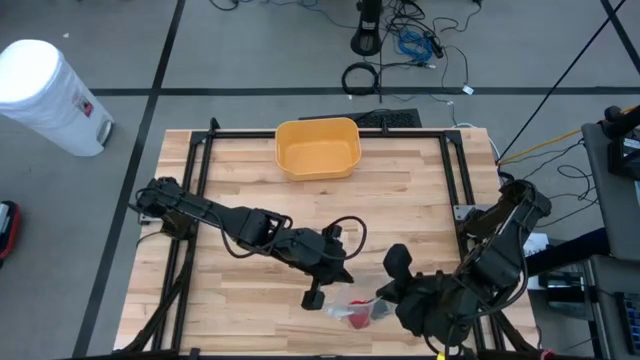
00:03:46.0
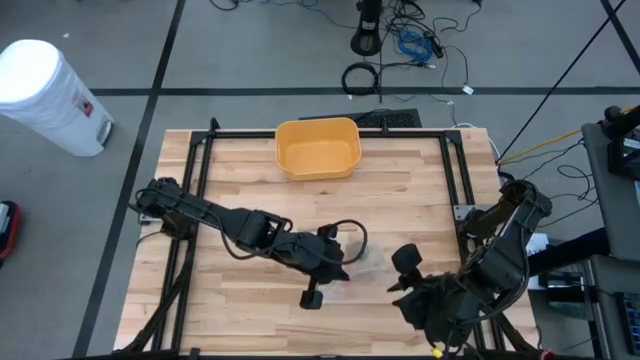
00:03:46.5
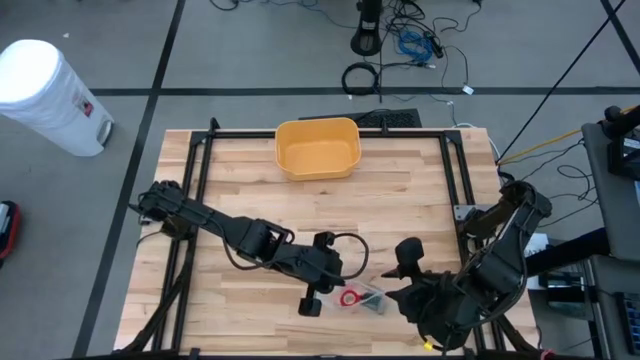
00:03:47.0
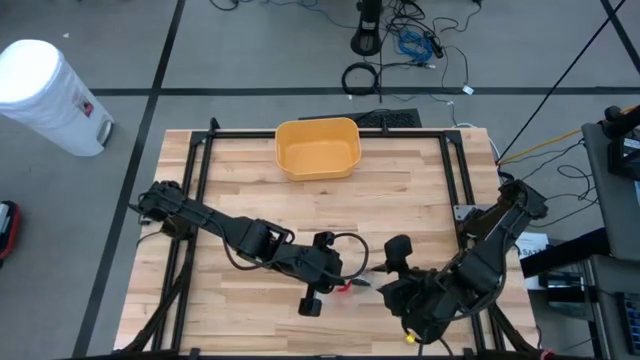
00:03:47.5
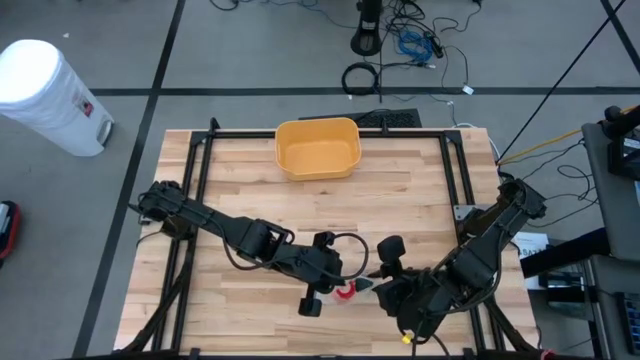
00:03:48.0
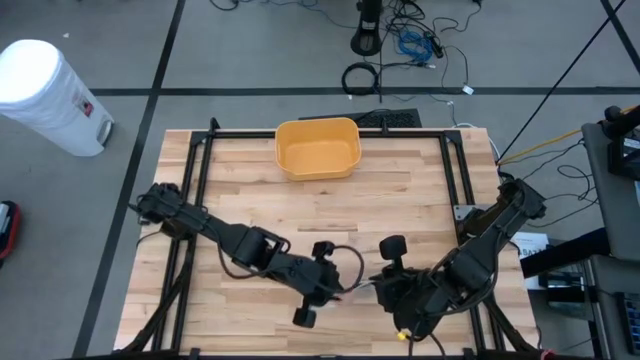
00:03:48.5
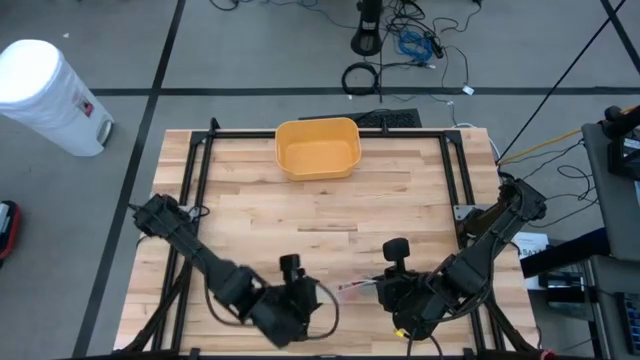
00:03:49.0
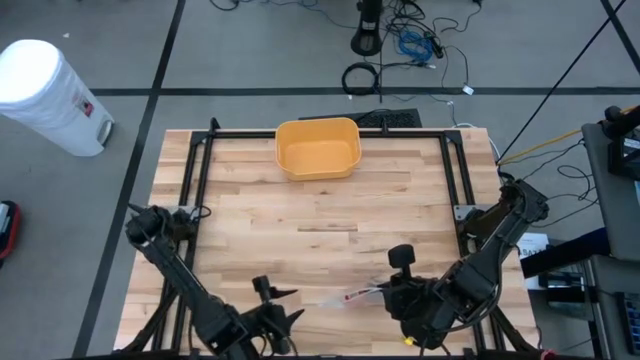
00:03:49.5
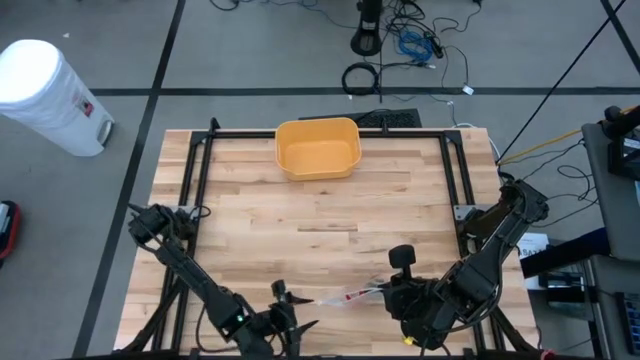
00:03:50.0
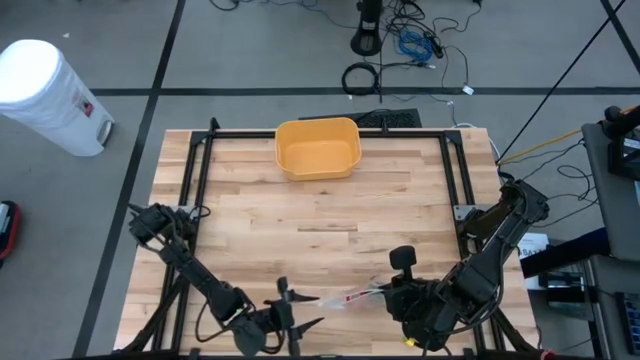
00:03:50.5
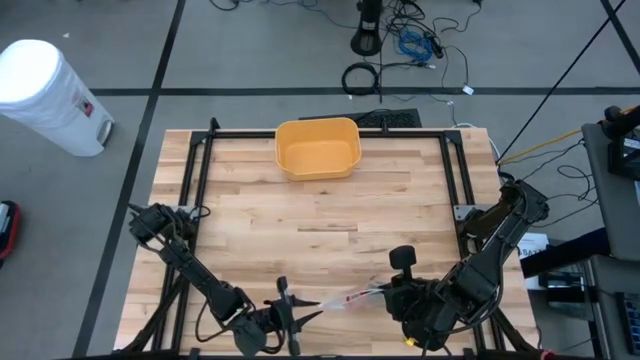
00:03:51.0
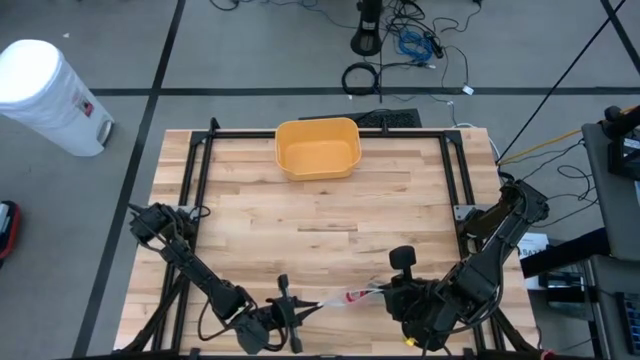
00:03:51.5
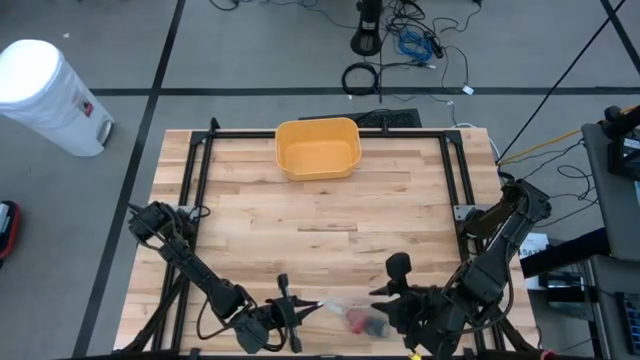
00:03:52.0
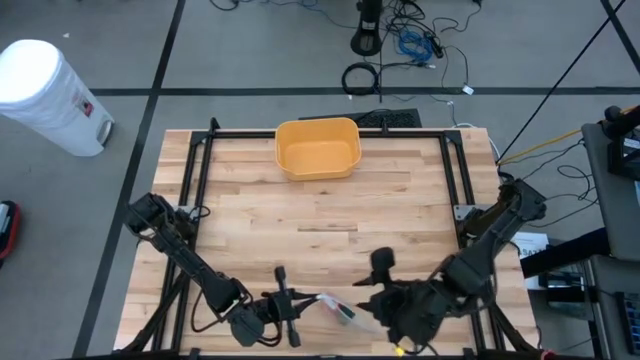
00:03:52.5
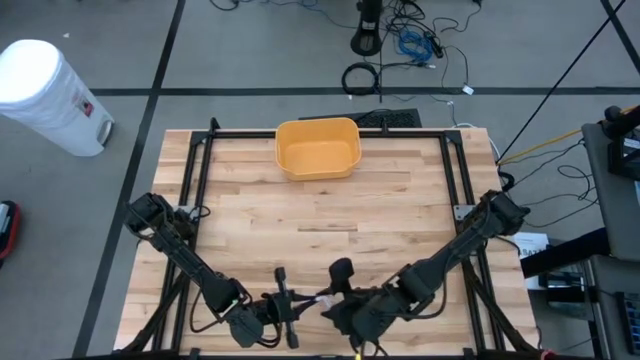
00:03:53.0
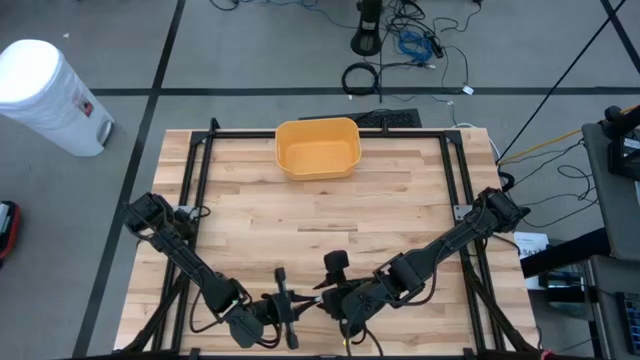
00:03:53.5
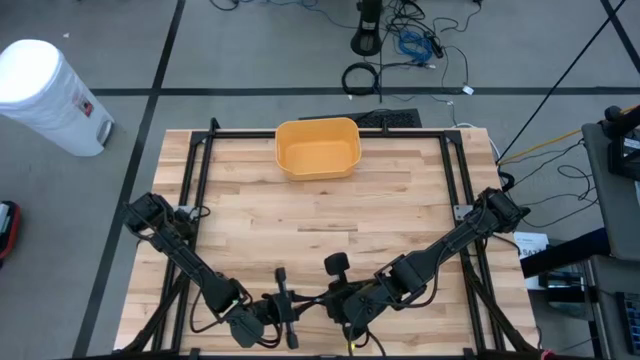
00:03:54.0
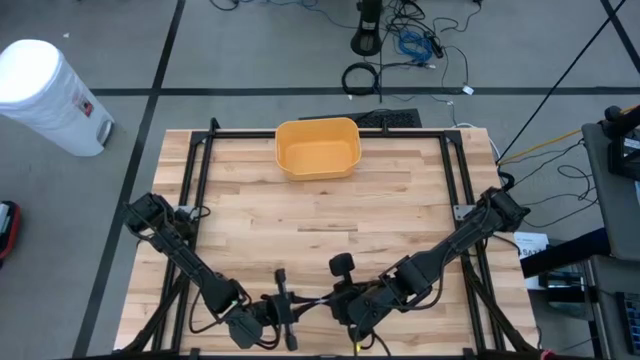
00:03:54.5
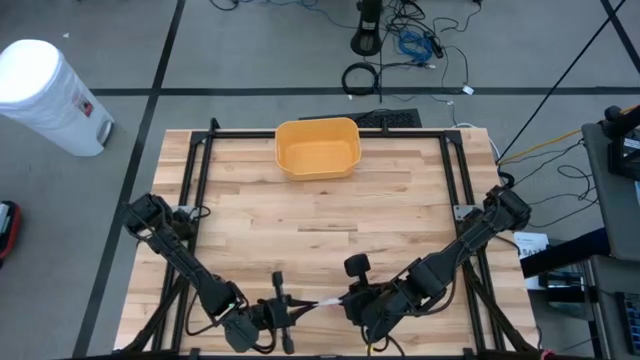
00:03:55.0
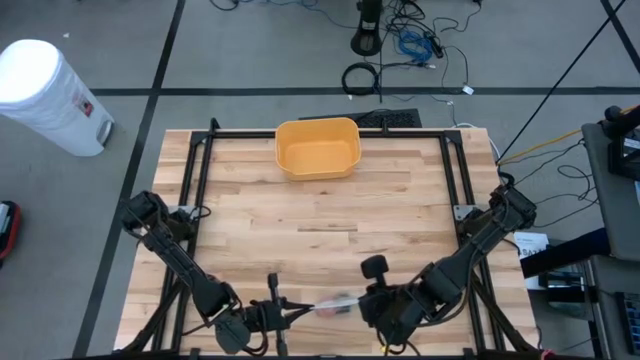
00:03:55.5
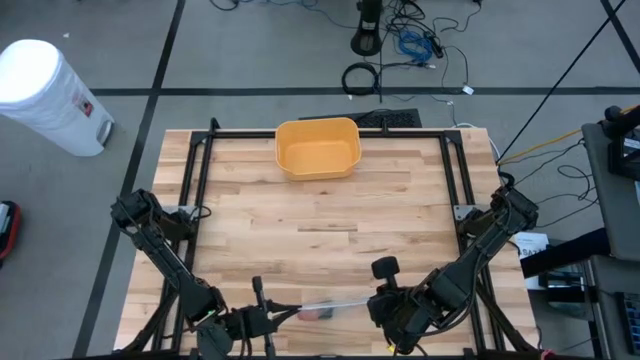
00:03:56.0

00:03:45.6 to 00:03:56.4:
Task: Roll bandage
Close the transparent zip bag

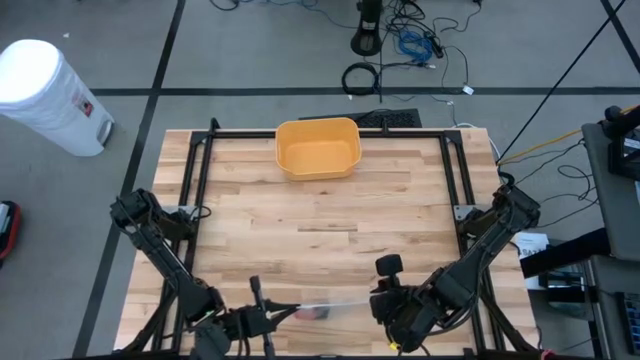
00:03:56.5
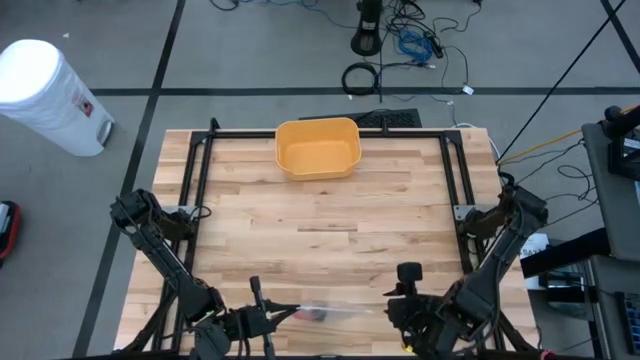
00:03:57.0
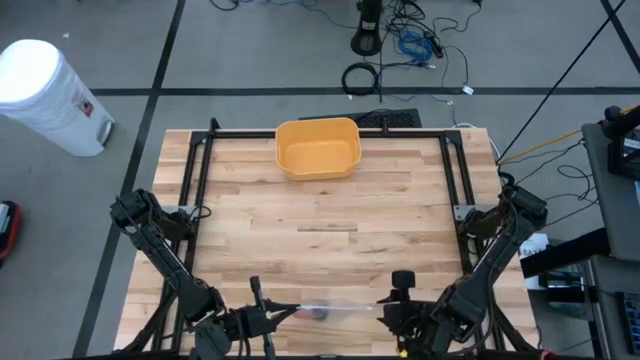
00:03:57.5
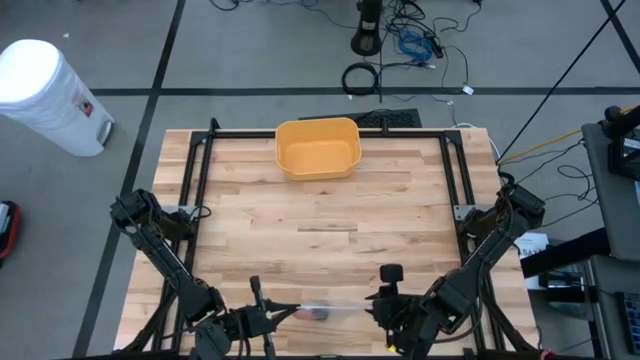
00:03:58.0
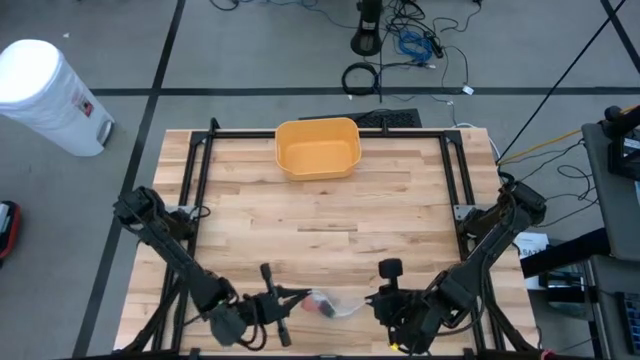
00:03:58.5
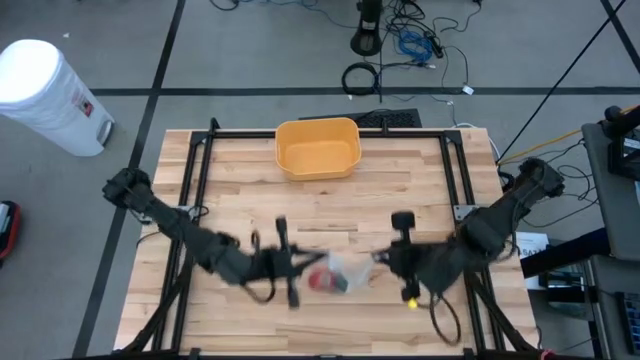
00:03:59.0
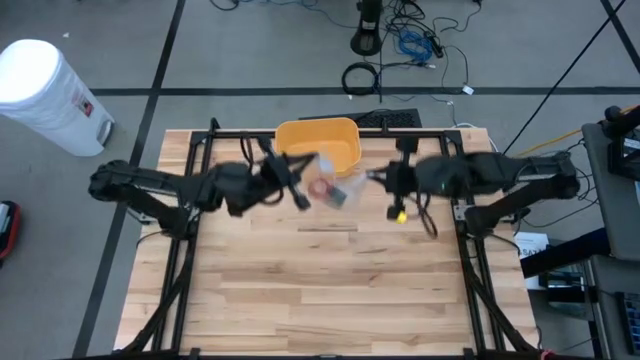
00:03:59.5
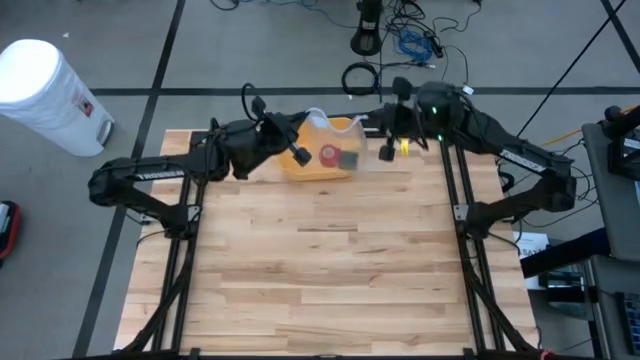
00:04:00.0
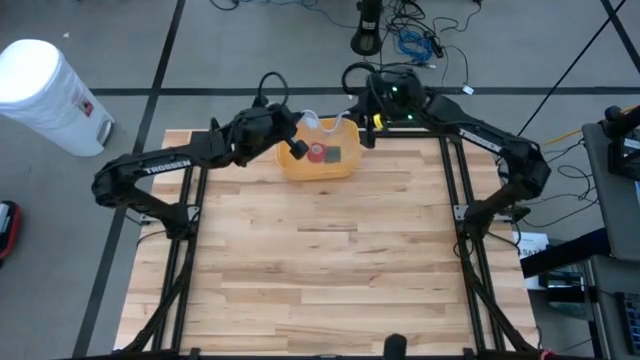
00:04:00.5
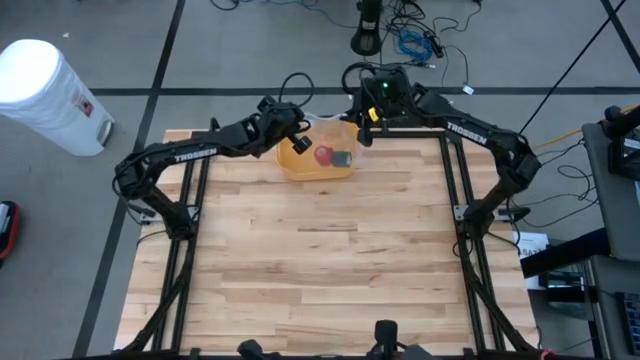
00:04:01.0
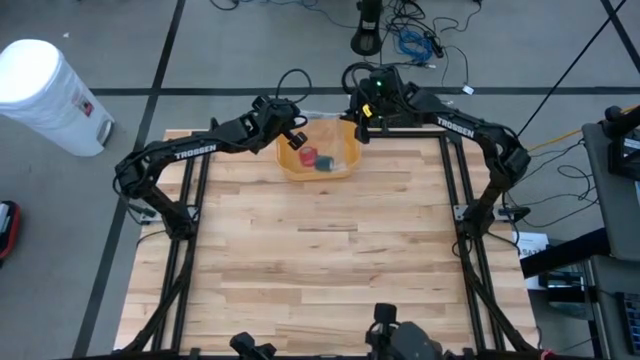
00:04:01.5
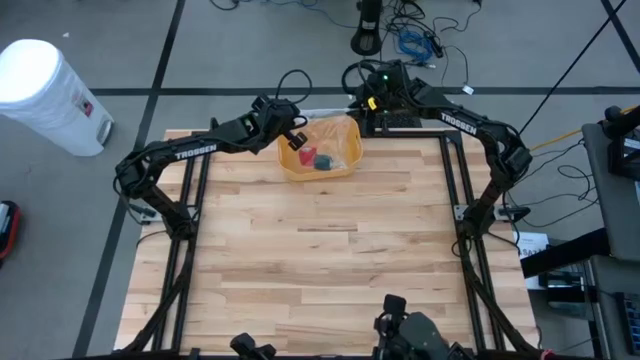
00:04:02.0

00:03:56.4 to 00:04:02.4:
Put the transparent zip bag into the yellow bin

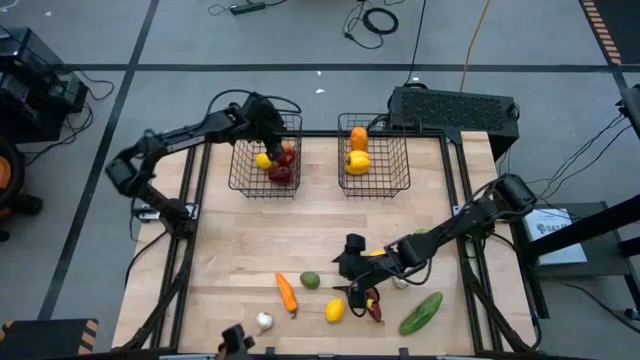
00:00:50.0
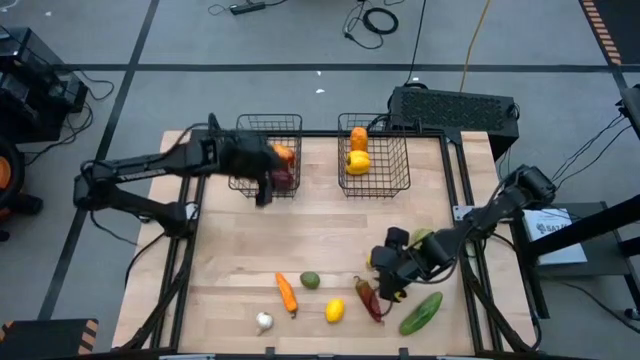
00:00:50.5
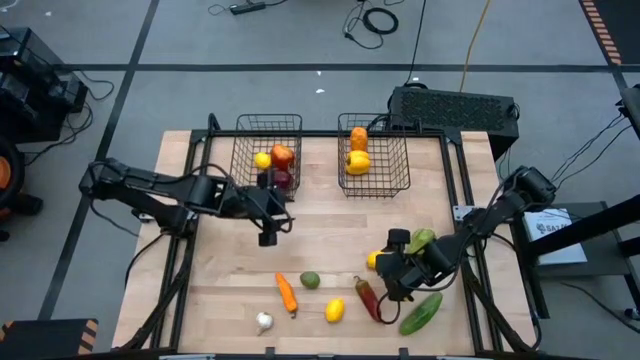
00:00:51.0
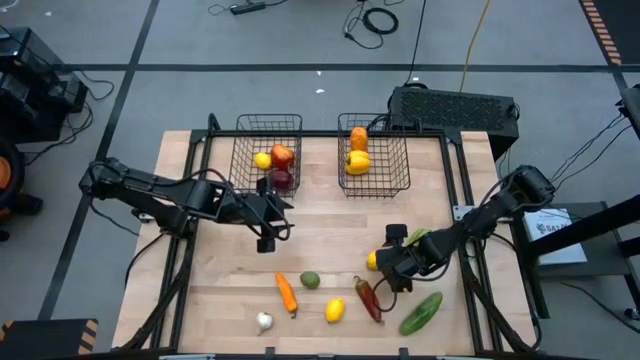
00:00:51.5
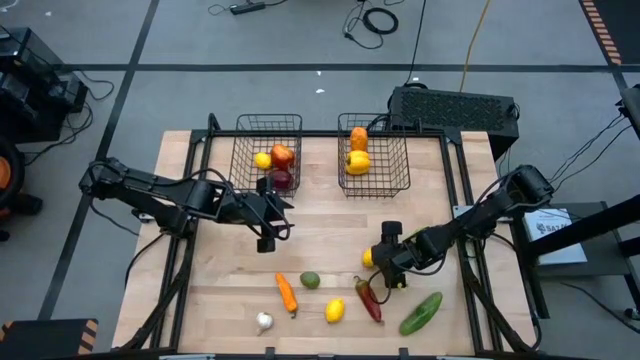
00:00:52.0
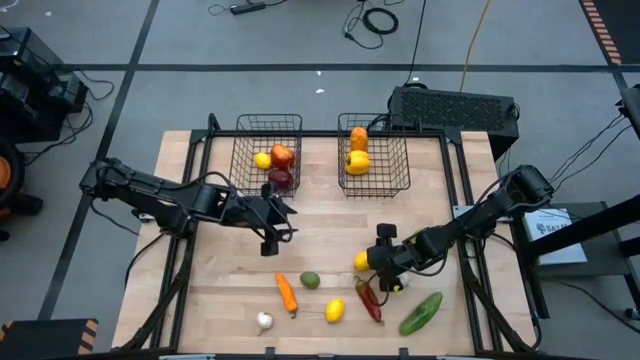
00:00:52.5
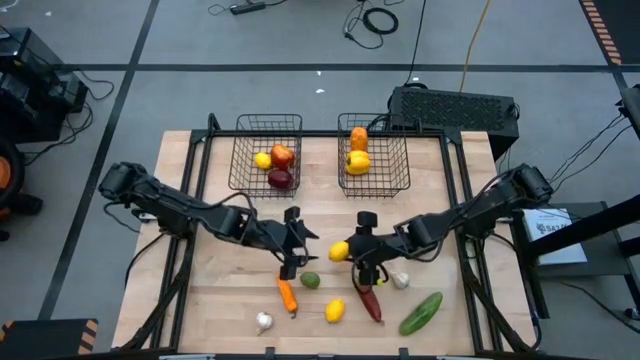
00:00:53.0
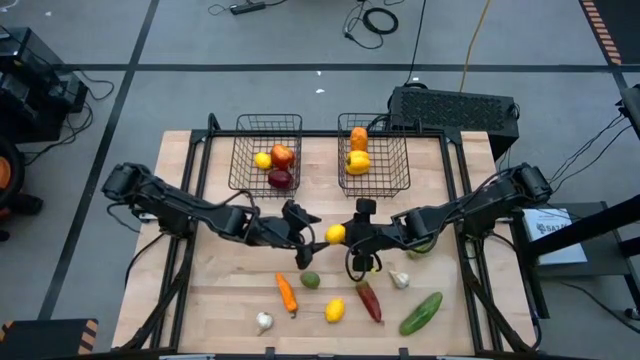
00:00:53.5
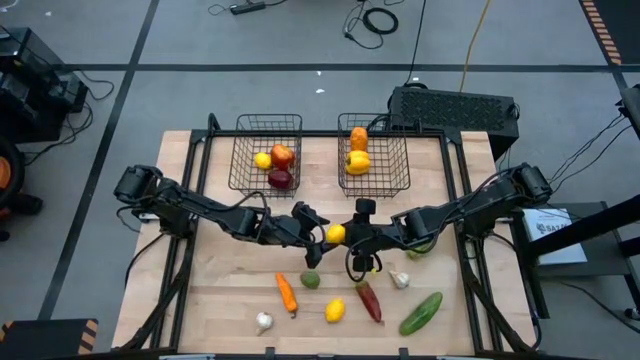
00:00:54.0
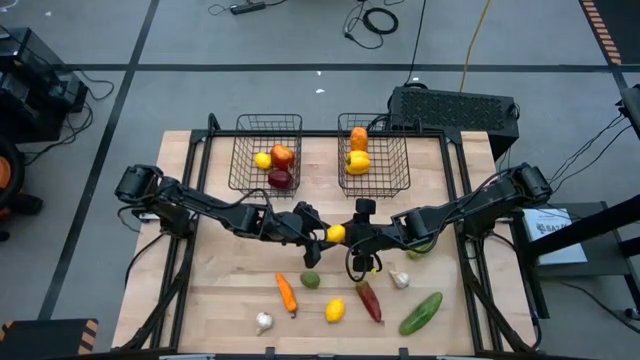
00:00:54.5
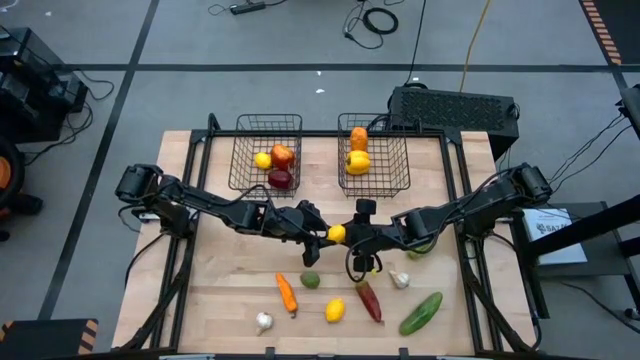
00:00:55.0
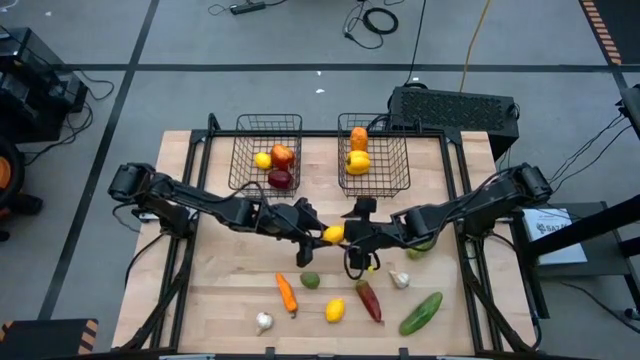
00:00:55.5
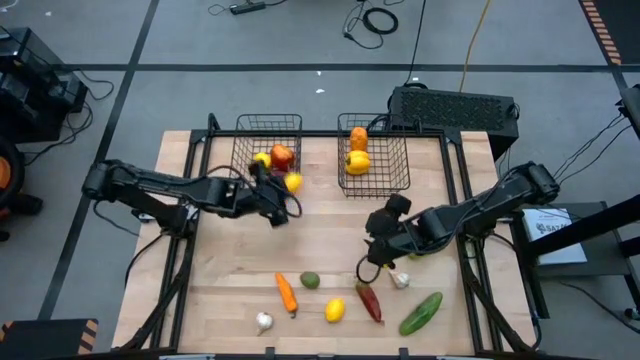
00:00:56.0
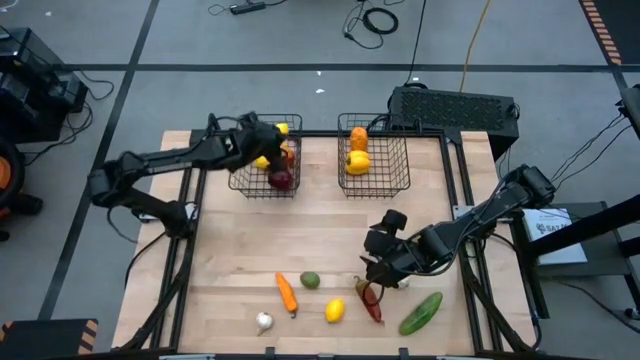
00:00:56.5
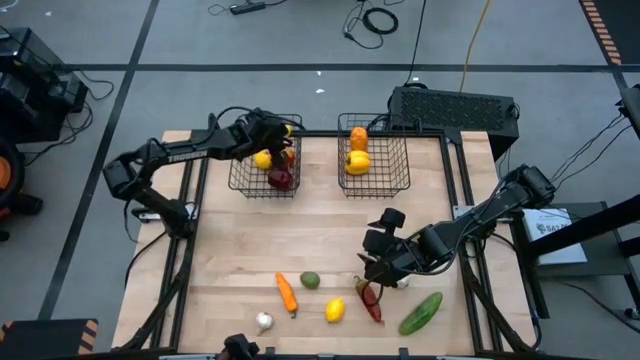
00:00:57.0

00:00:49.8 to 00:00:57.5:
Task: Sort produce into baskets
Put the top yellow lemon into the left mesh basket
